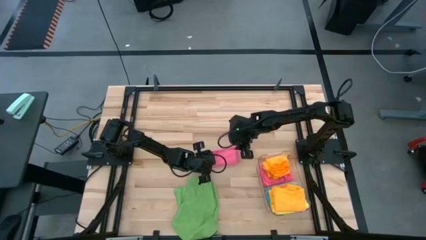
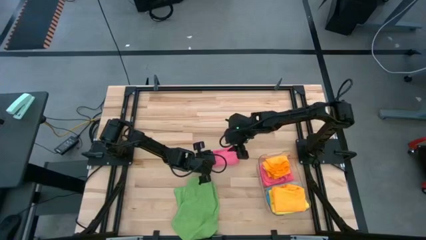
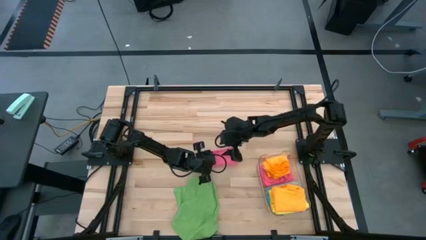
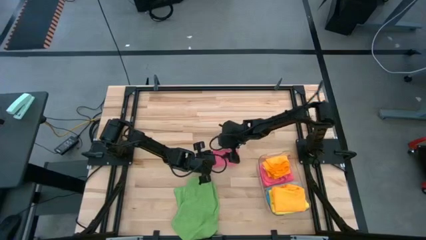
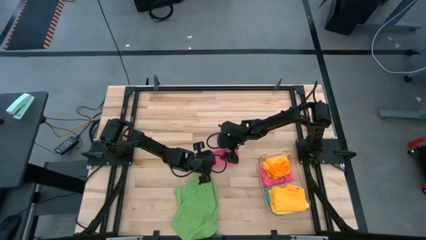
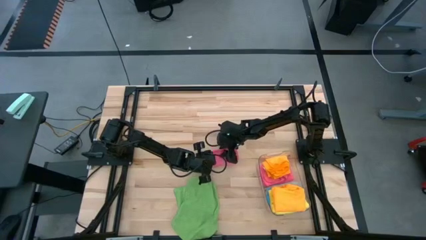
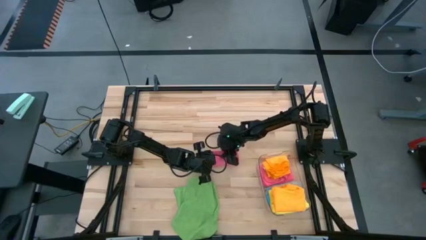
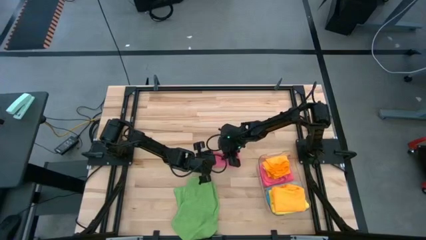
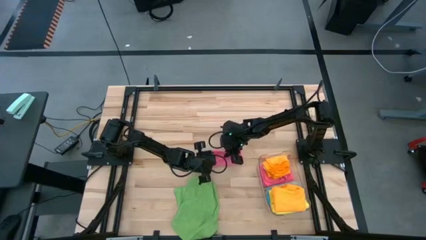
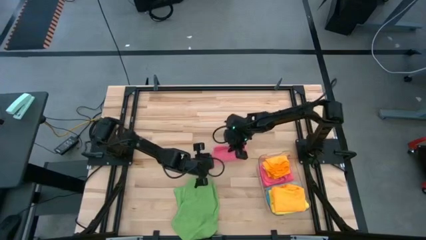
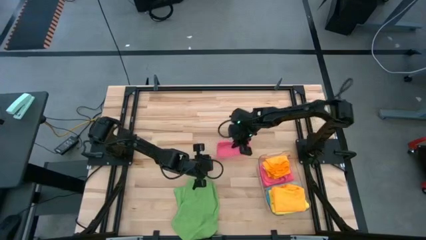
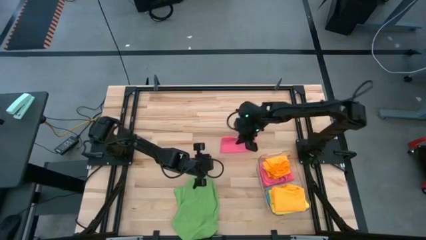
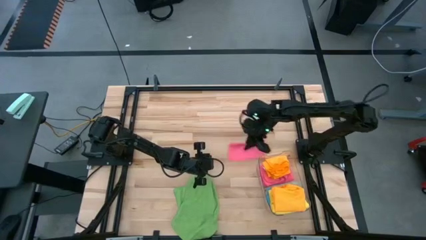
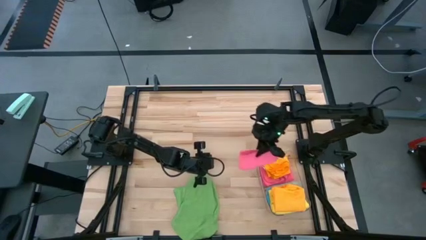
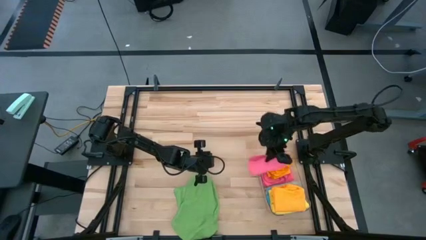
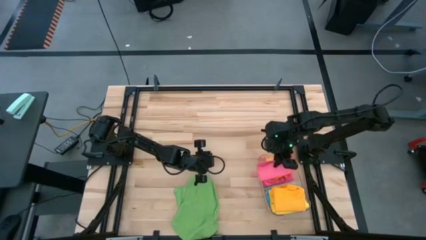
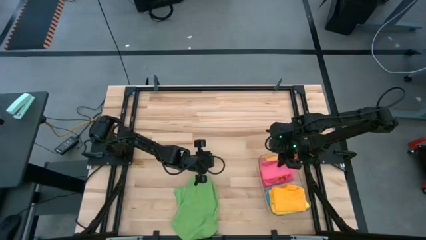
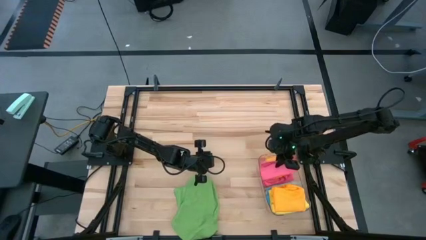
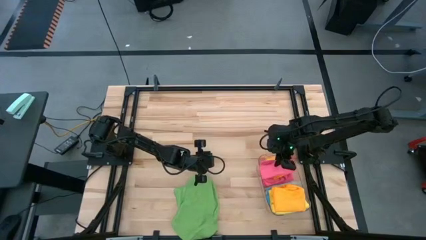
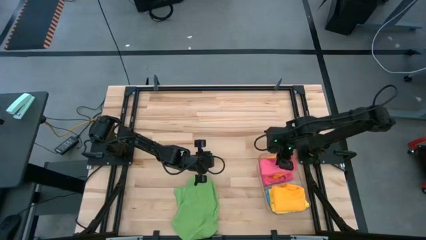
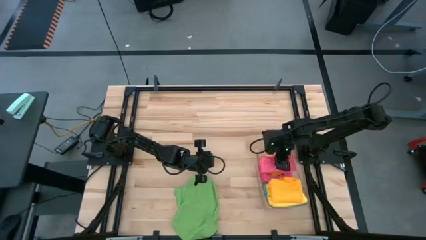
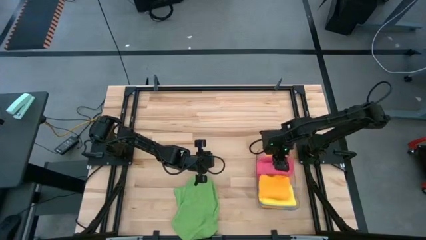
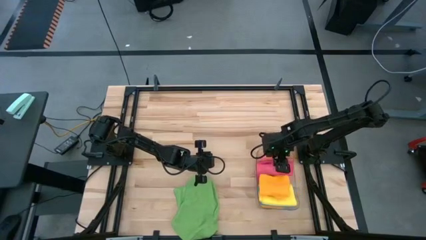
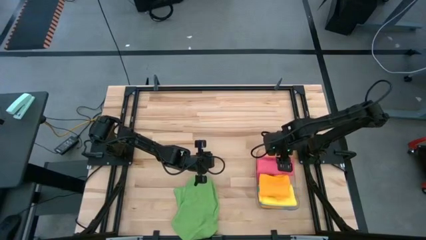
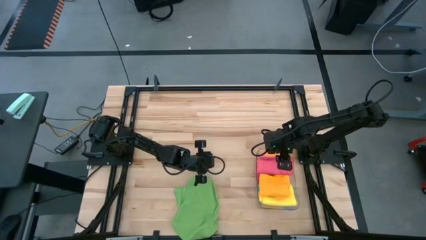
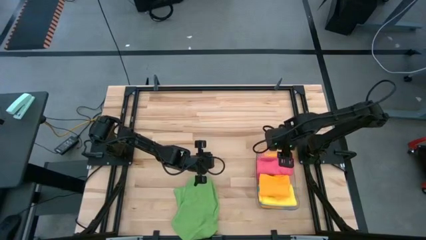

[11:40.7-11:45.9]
Task: Fold microfiber towels
Put the folded pink towel into the transparent bin

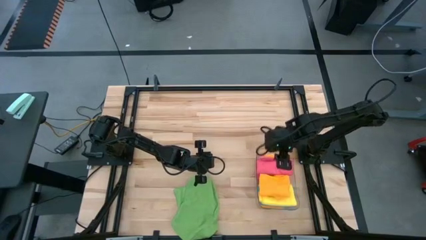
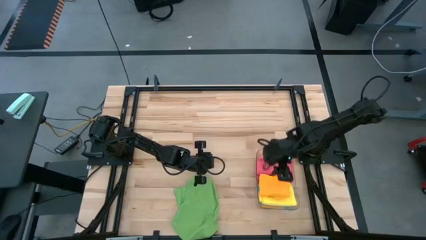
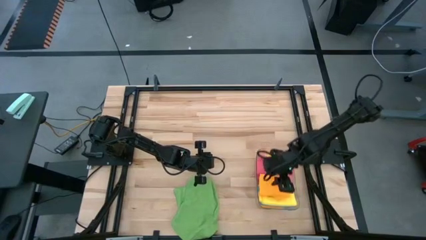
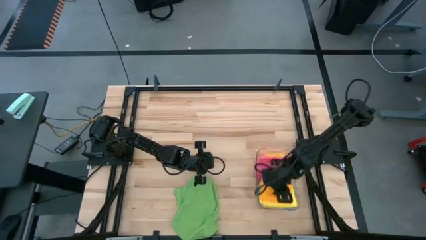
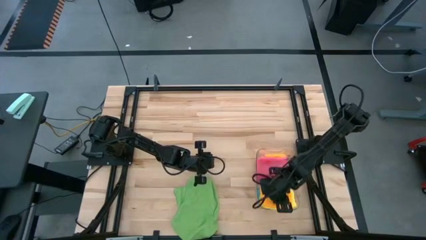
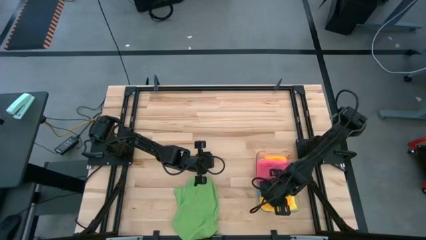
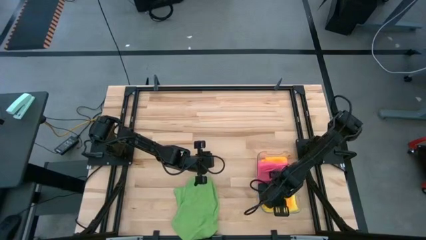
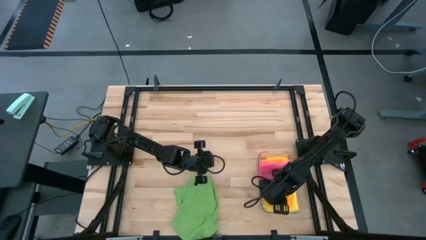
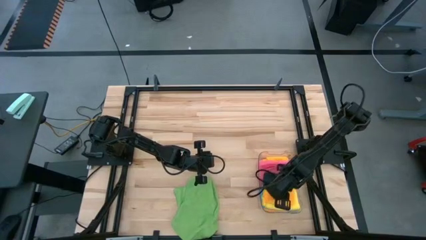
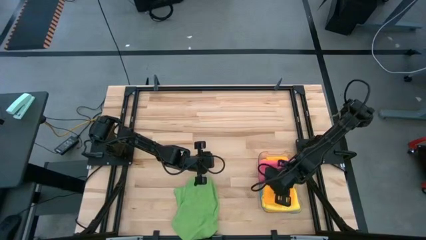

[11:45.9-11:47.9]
Adjust the folded orange towel in the transparent bin

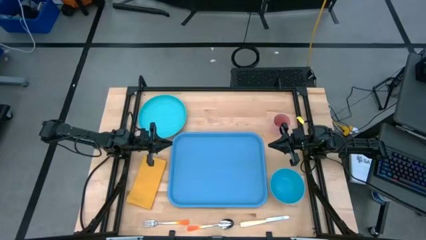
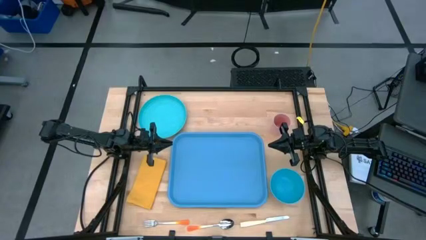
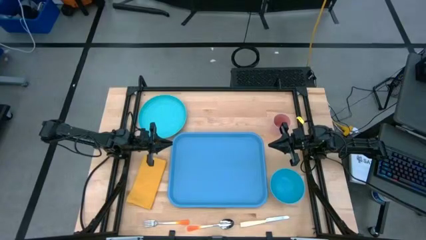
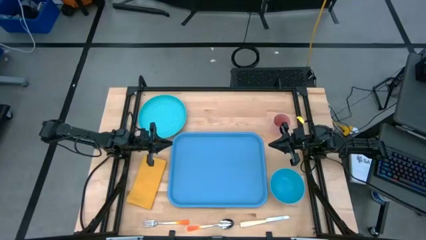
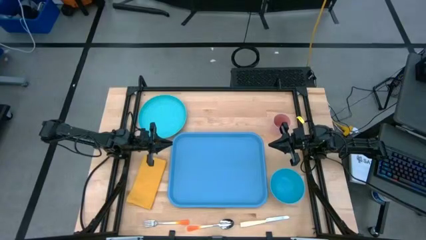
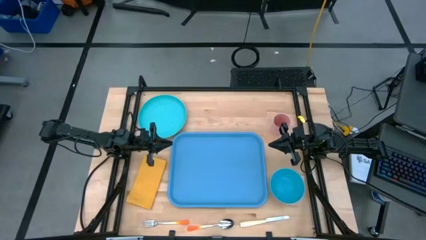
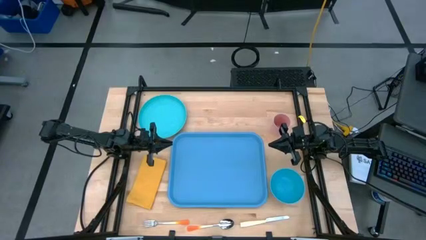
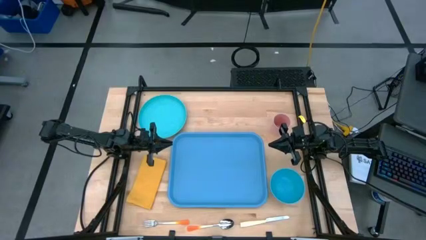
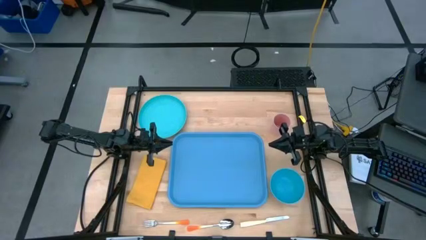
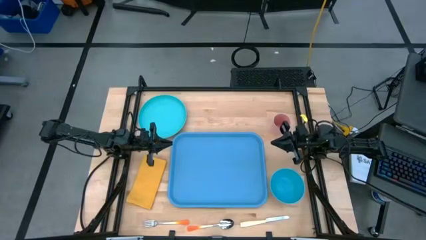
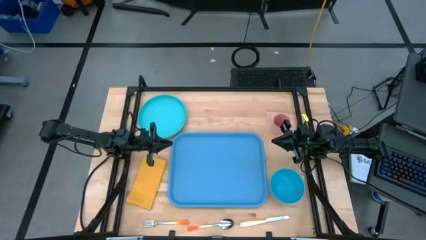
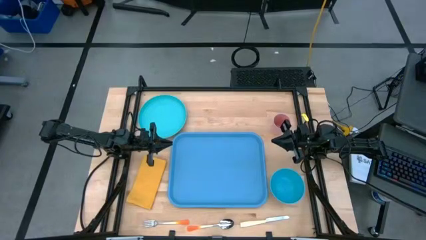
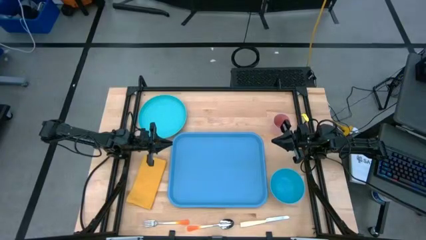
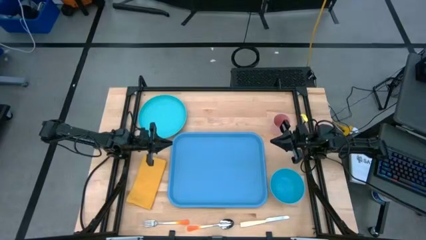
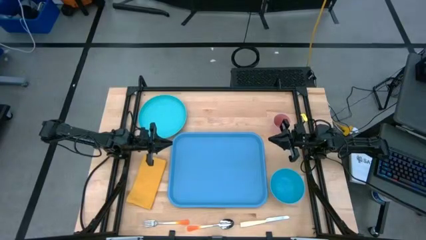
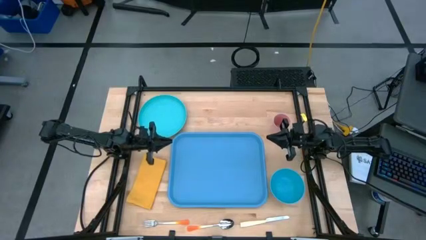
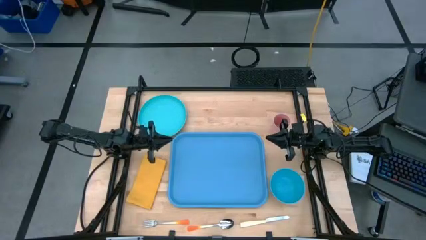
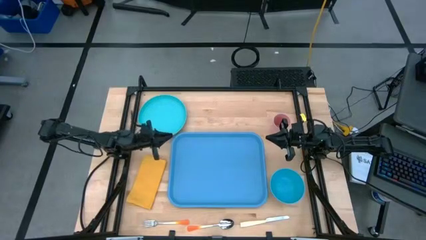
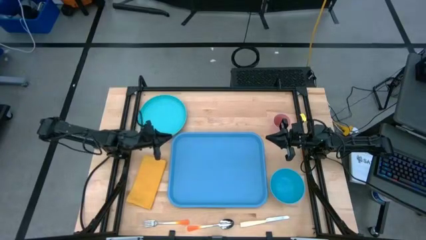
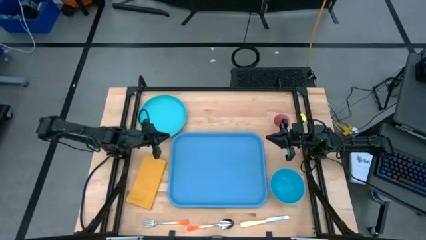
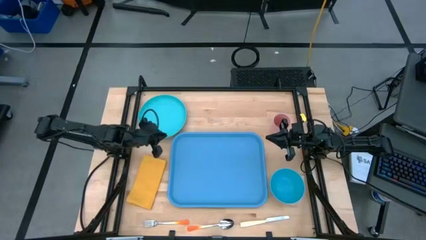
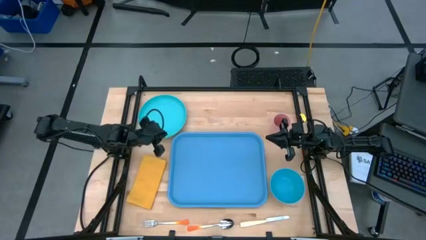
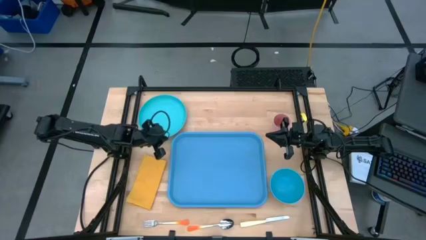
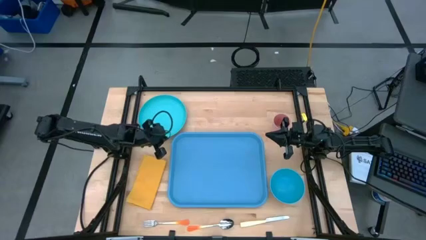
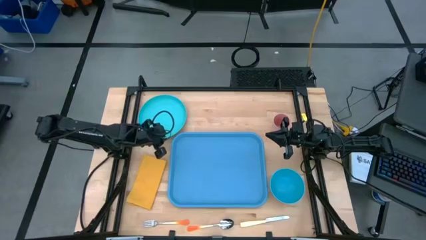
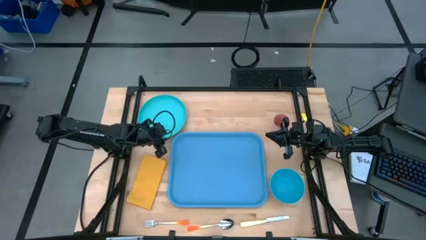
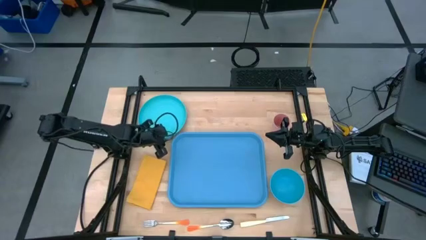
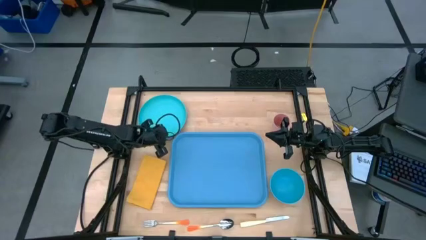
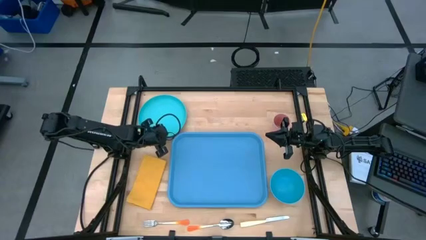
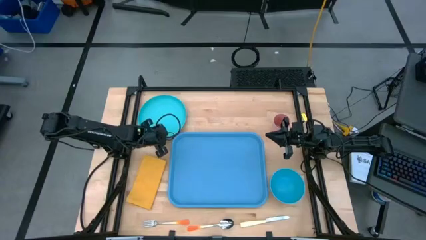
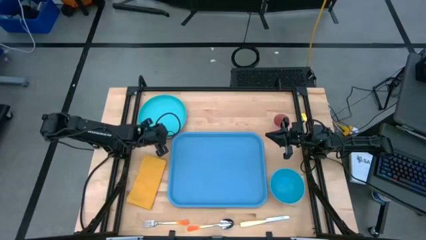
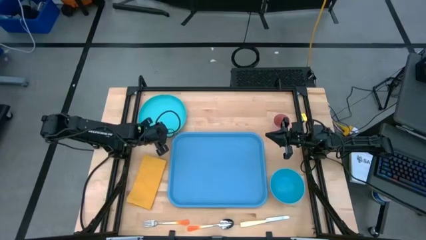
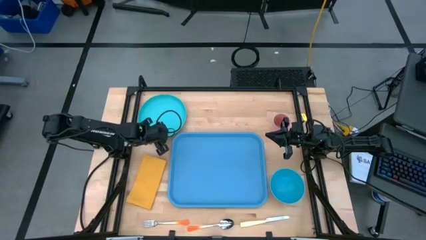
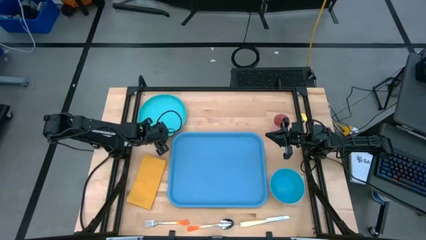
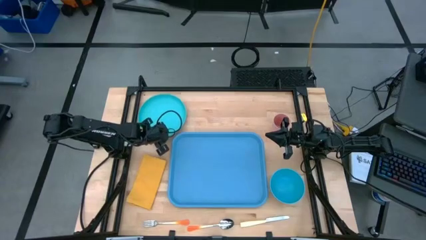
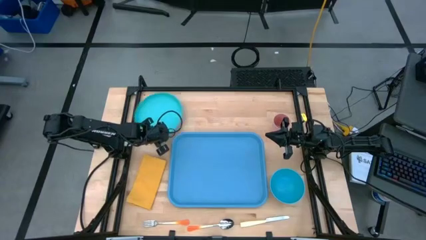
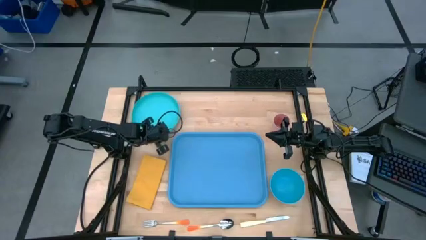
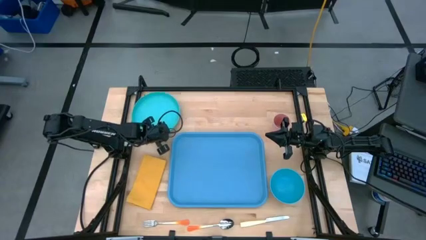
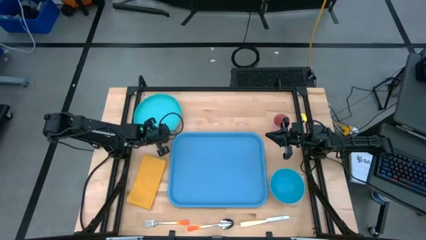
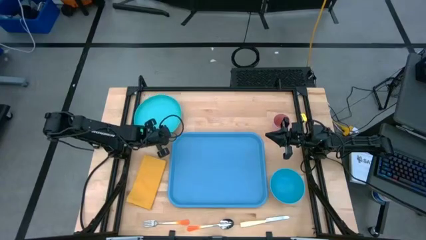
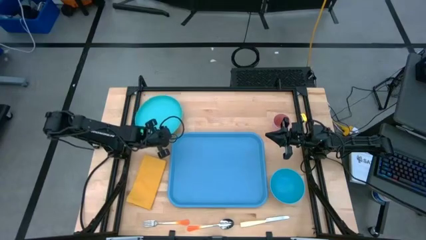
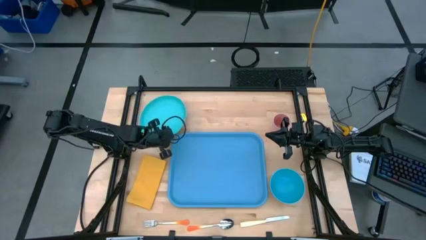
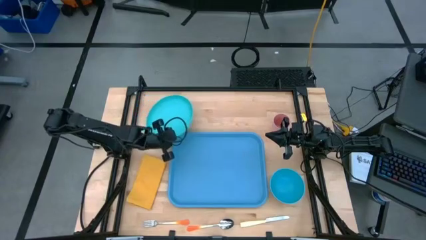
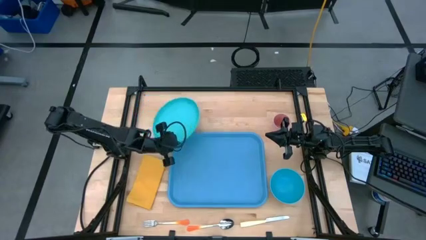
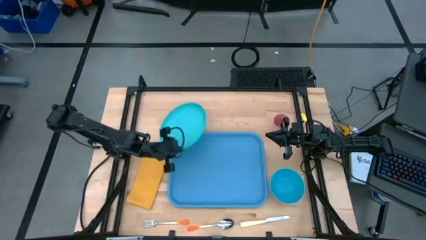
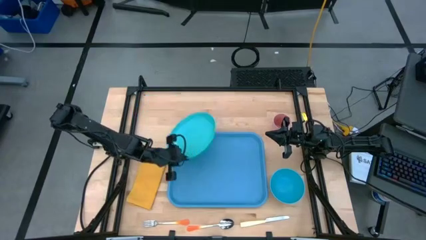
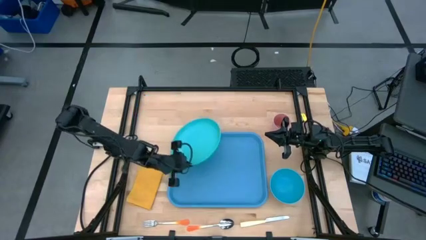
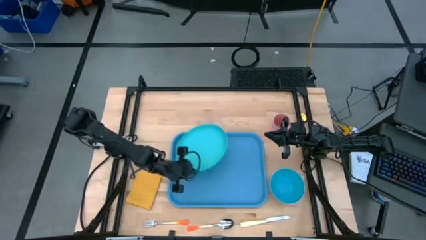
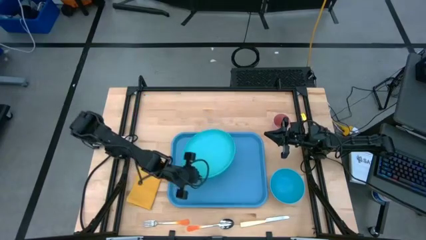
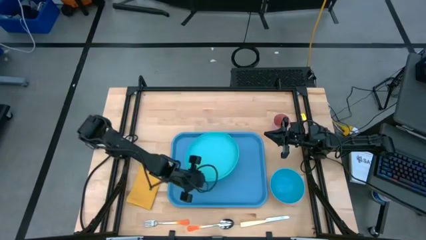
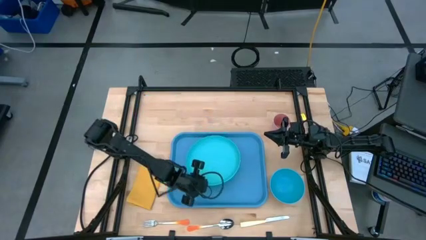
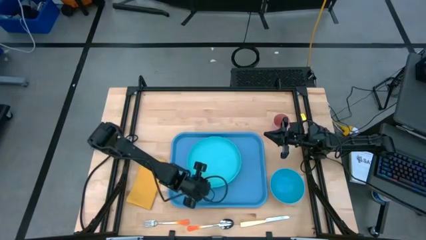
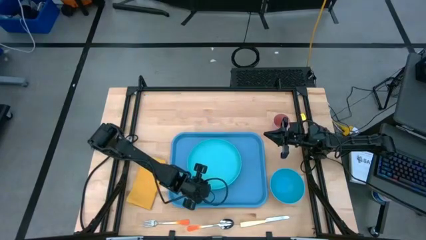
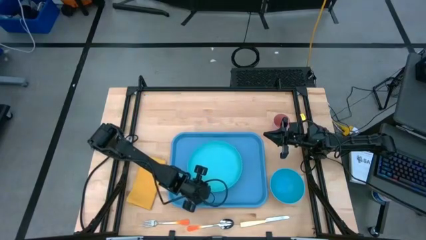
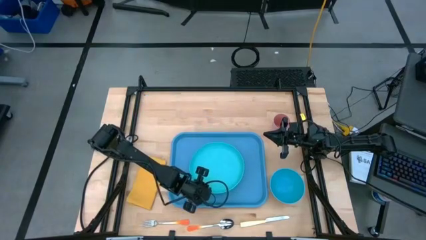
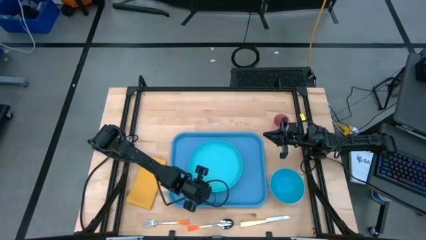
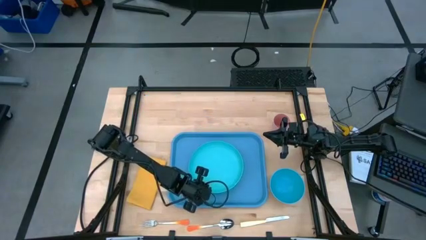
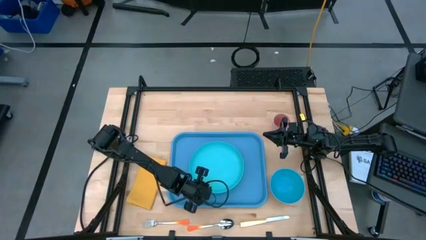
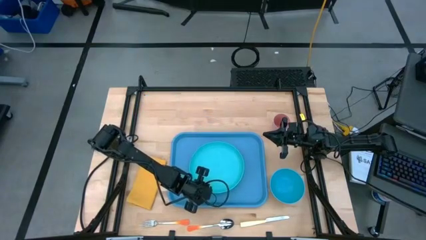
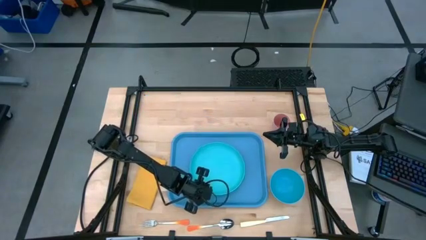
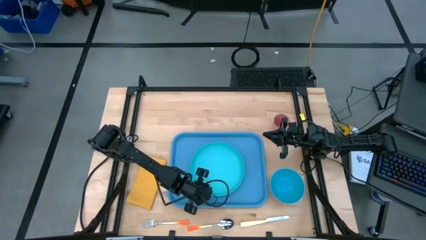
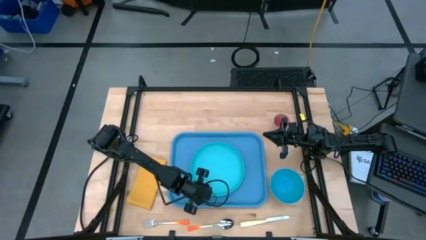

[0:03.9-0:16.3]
Task: Set up tray
Put the blue plate on the blue tray
